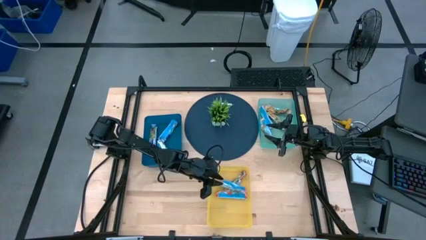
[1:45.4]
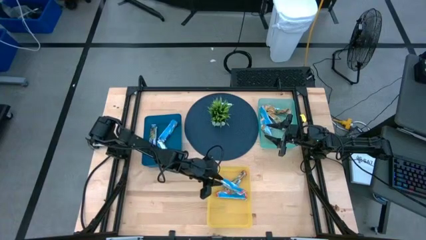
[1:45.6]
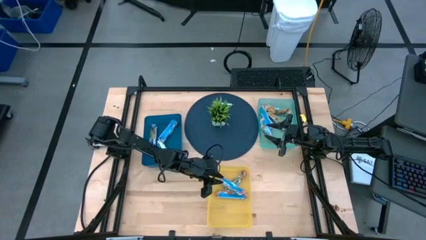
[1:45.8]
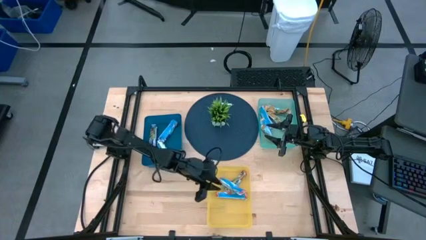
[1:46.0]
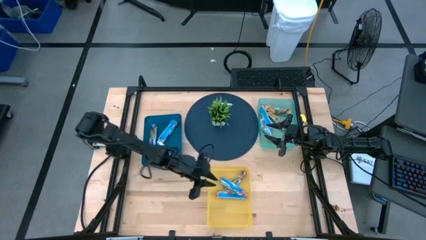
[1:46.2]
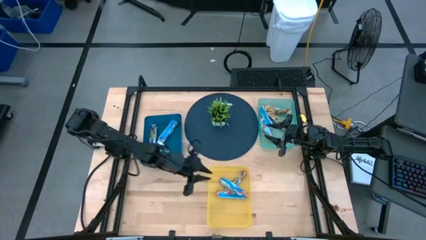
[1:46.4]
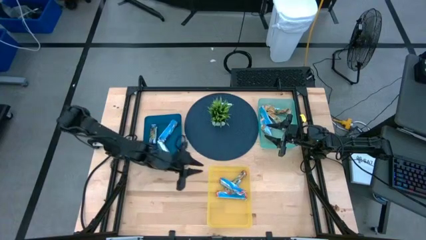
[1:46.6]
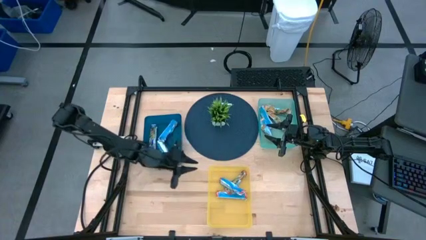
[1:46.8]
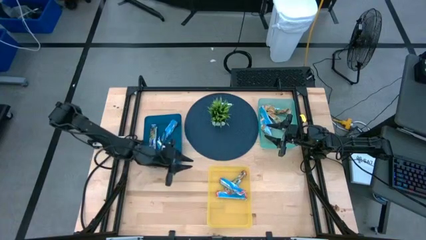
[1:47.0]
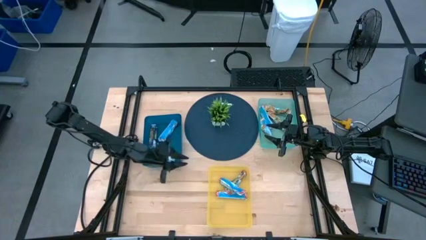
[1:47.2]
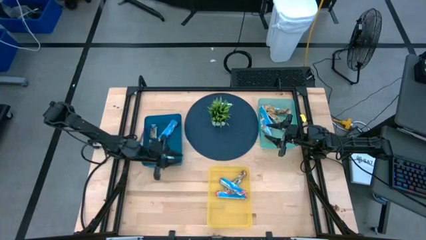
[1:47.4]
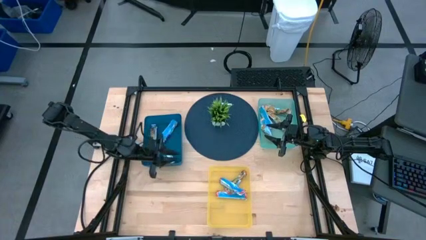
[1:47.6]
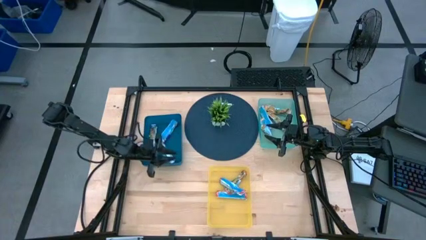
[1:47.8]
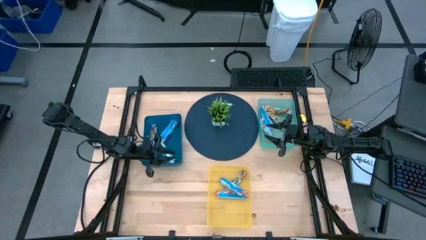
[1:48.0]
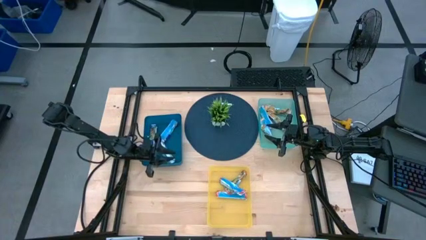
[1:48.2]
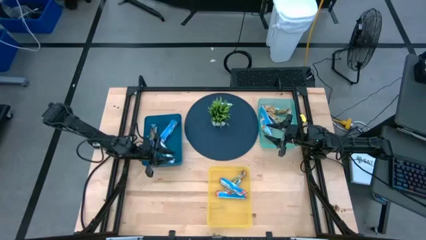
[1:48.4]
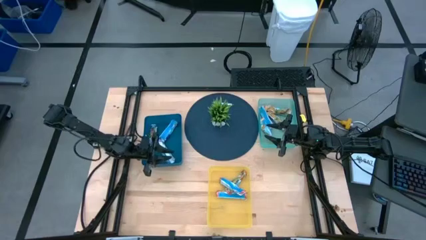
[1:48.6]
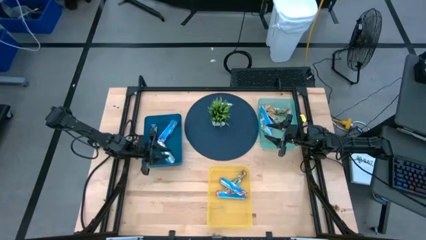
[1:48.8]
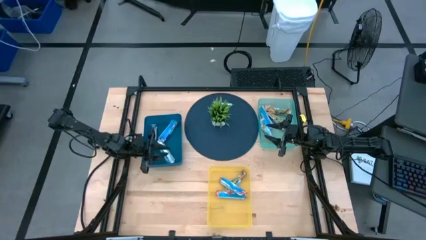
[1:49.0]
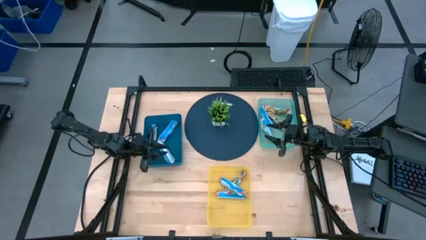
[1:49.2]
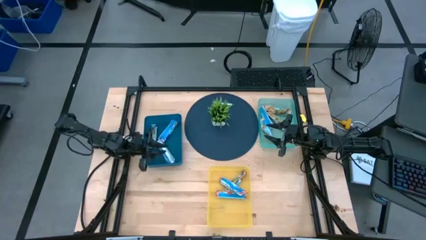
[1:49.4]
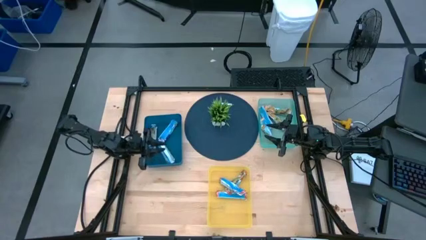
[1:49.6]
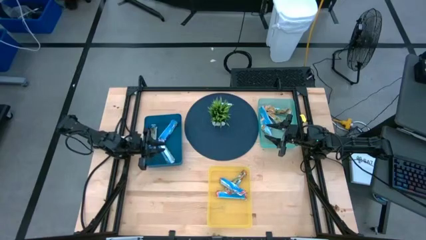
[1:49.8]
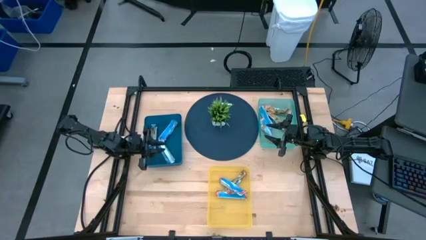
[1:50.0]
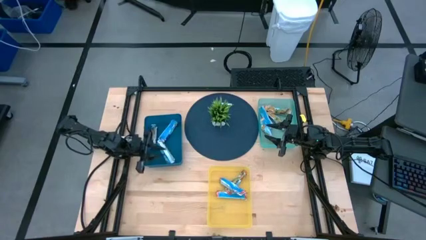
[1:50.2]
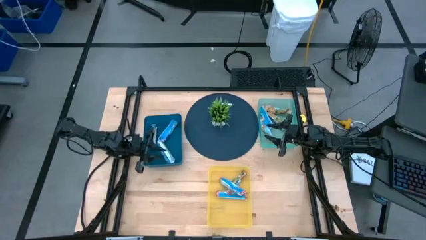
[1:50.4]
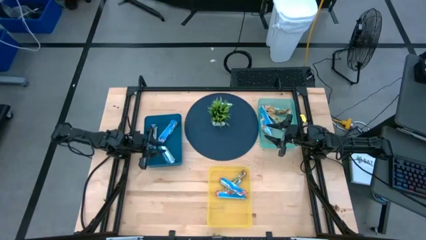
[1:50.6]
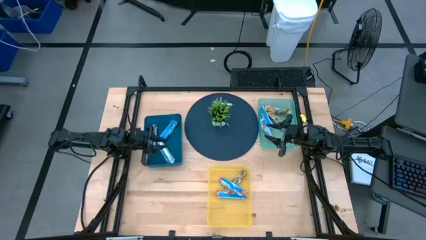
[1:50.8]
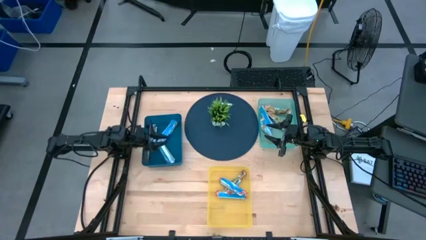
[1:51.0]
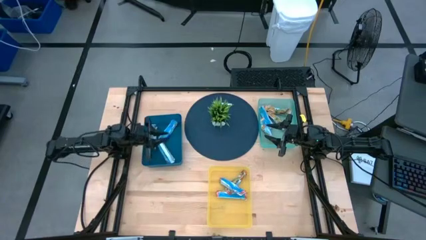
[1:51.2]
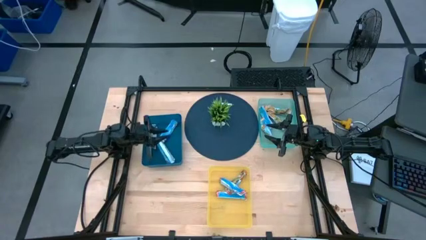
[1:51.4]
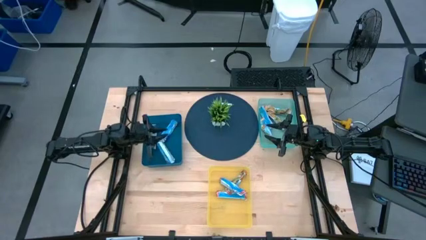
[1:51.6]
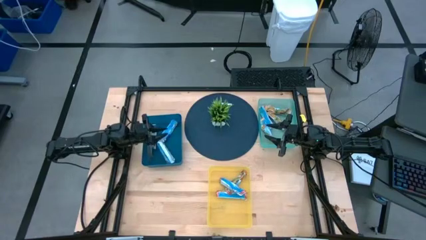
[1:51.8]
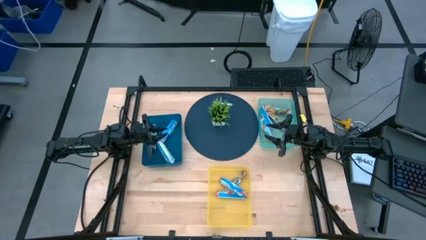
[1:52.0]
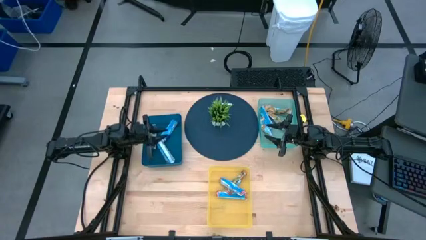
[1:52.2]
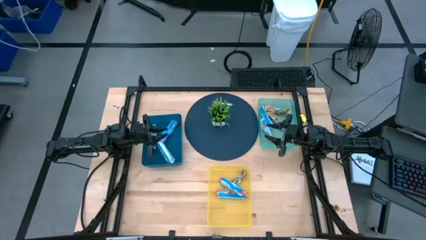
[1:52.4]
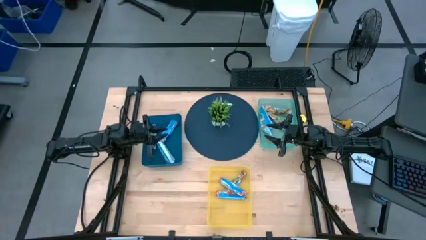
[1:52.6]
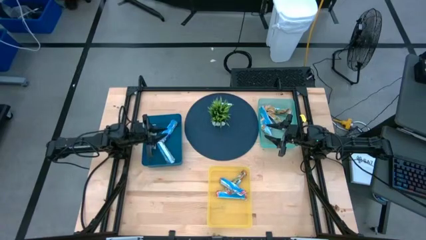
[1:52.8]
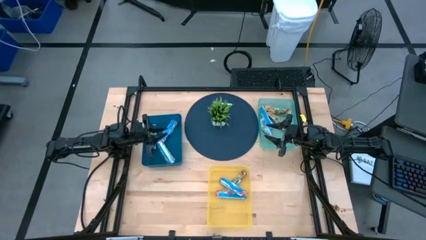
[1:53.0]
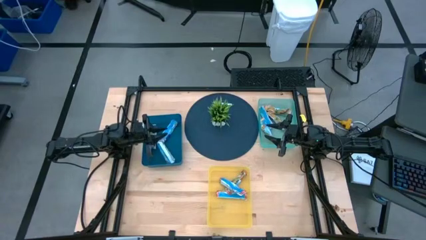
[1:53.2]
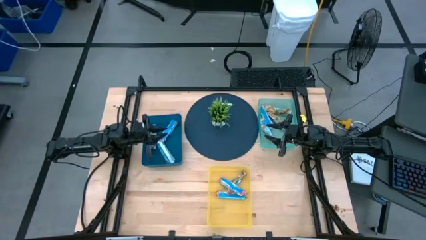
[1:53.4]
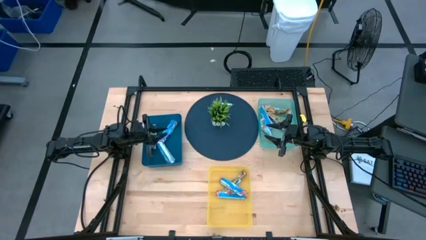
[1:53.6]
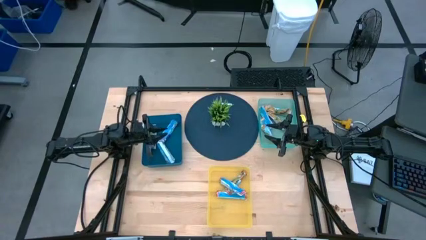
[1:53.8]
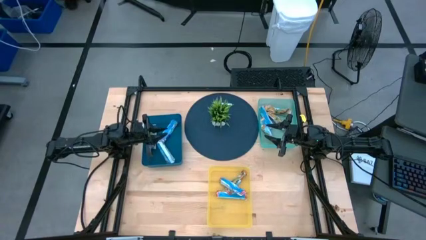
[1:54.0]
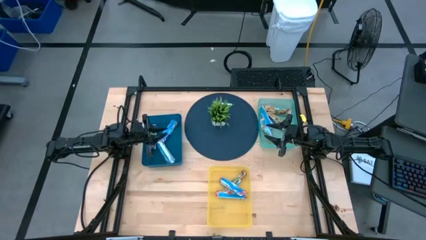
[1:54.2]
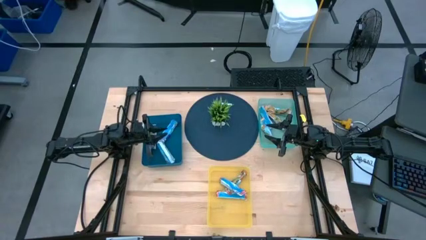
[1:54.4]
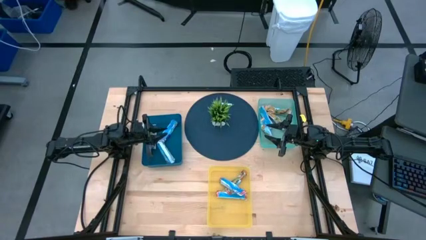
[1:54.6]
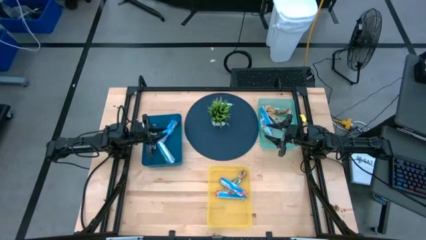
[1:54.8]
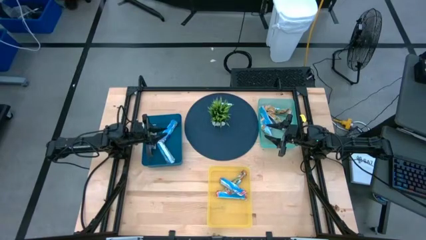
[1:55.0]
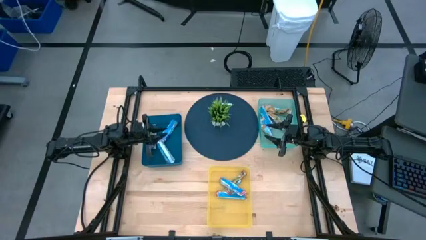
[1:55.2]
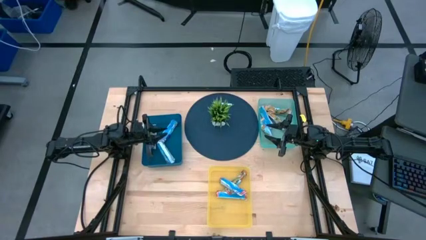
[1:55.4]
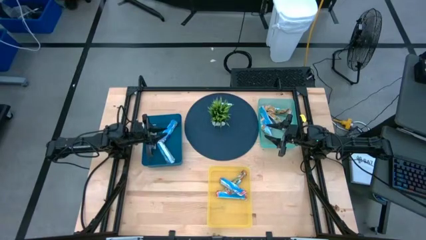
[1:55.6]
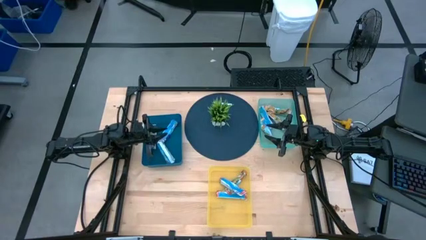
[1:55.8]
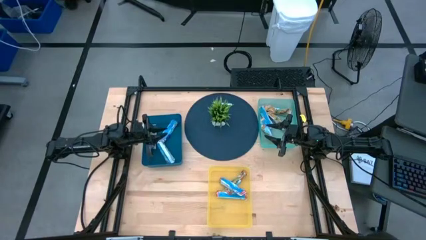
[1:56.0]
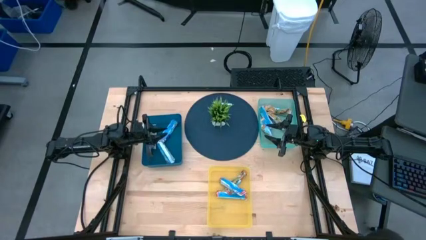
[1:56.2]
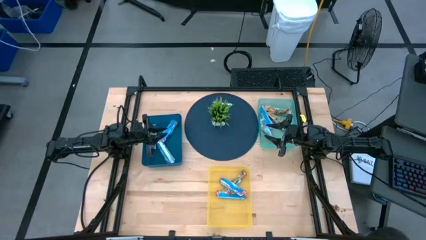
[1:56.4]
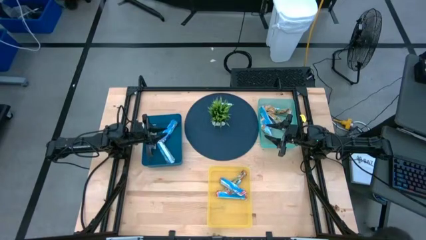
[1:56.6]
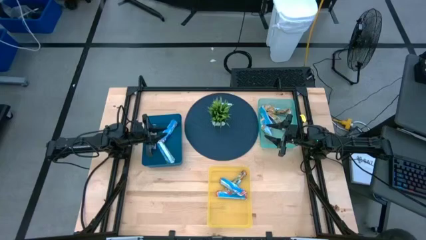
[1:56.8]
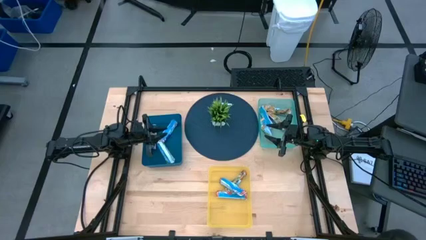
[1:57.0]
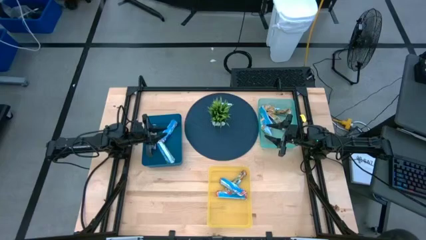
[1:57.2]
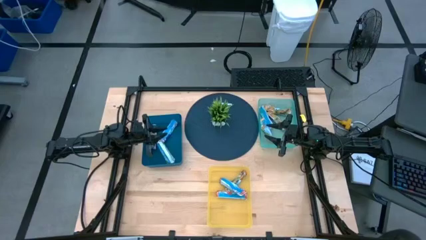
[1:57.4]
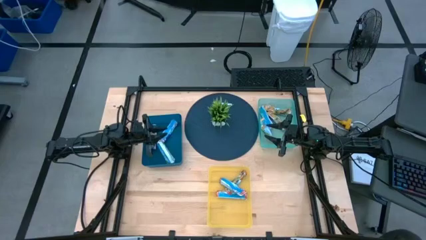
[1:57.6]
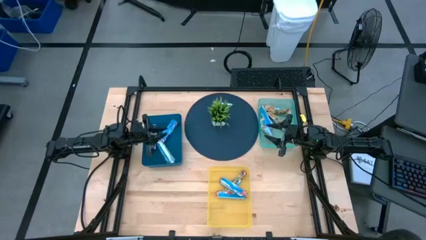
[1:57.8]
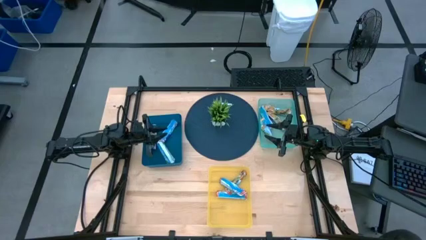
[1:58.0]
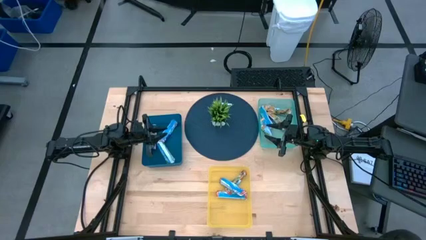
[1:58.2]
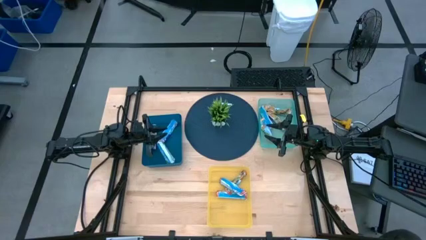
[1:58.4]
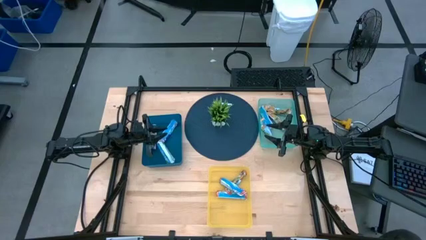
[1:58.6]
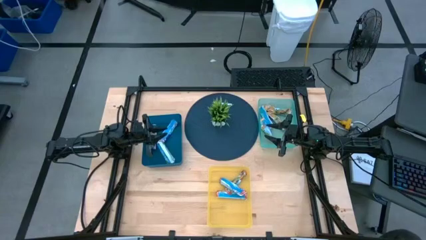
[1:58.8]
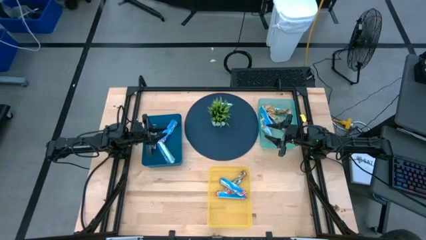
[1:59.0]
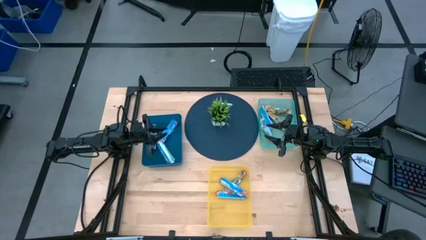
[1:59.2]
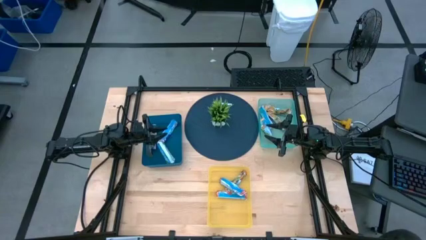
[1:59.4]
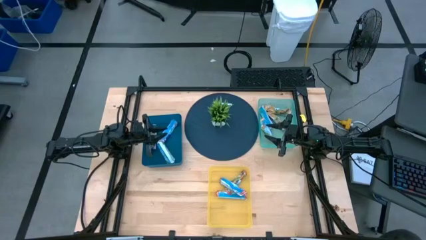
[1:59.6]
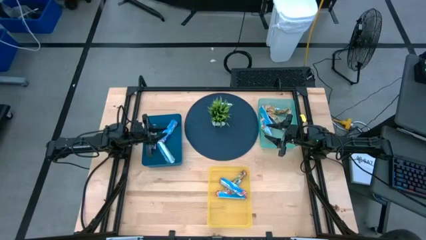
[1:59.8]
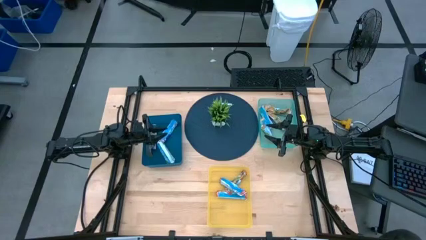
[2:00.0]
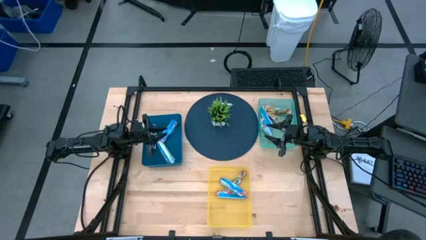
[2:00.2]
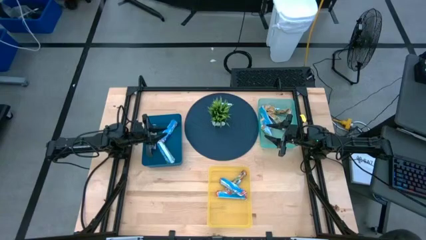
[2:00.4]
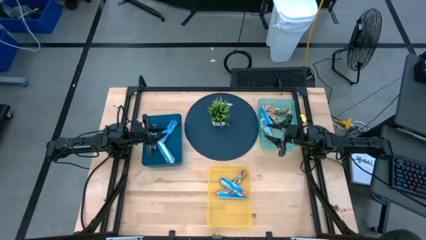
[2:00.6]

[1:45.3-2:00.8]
Task: Pick and place Granola Bars by type
Return to Home Position
